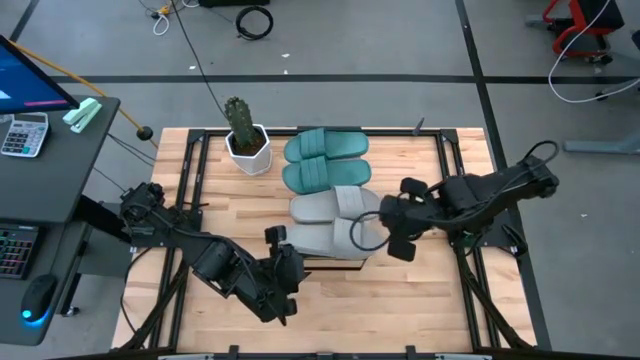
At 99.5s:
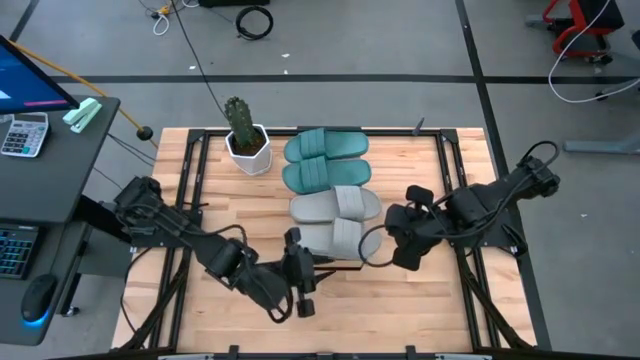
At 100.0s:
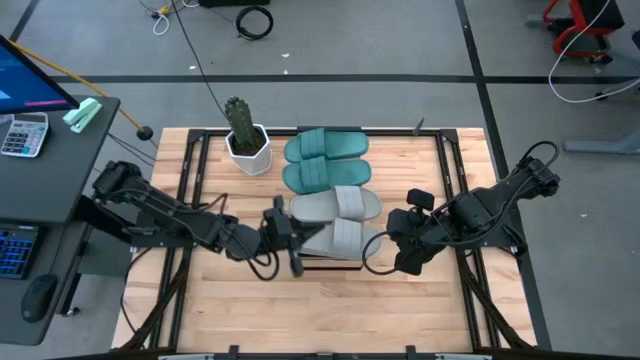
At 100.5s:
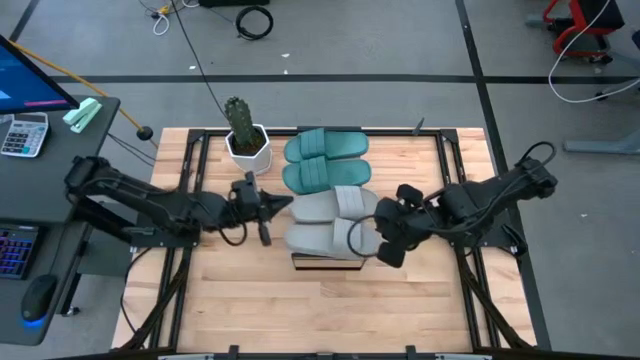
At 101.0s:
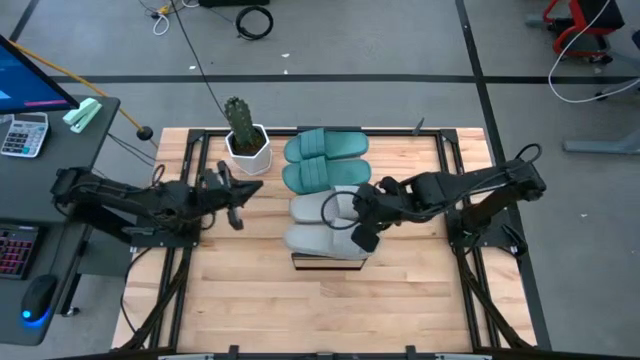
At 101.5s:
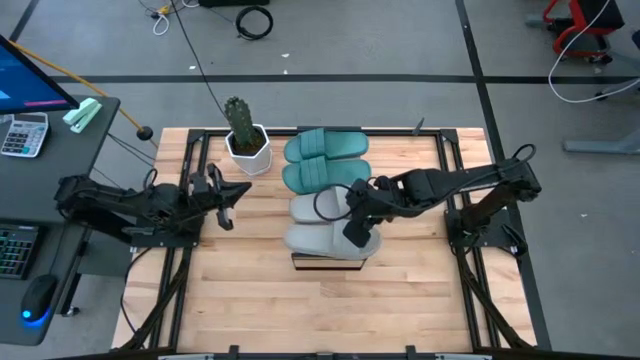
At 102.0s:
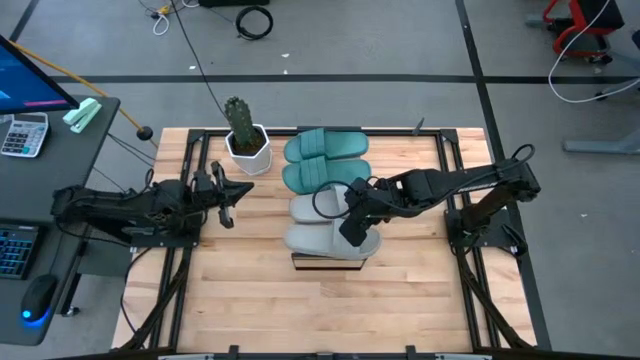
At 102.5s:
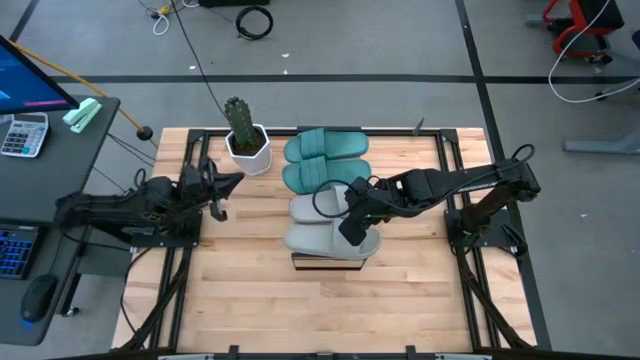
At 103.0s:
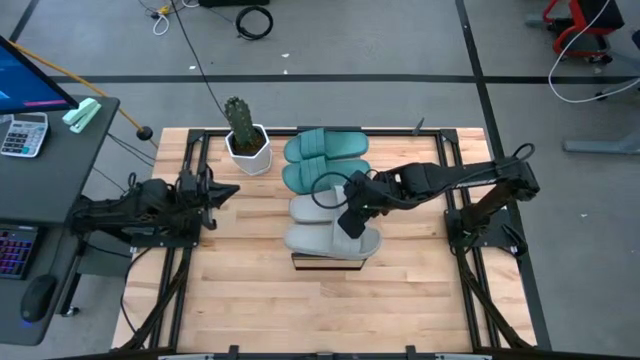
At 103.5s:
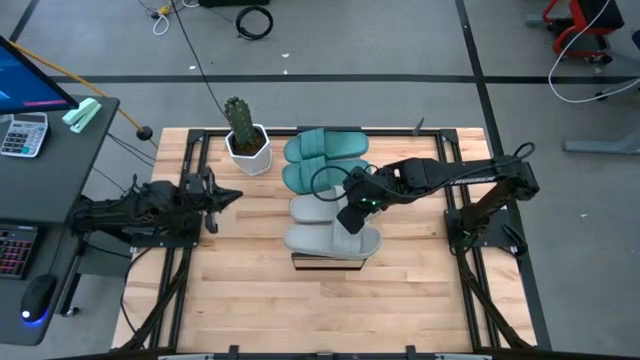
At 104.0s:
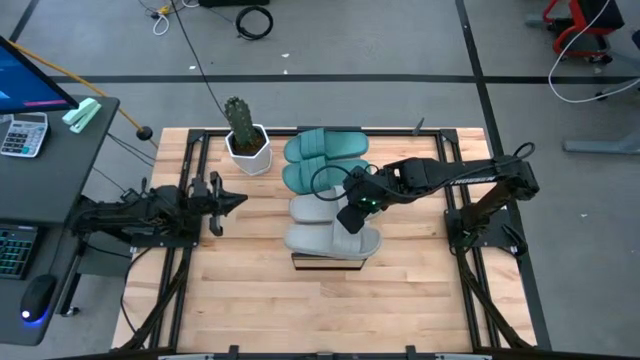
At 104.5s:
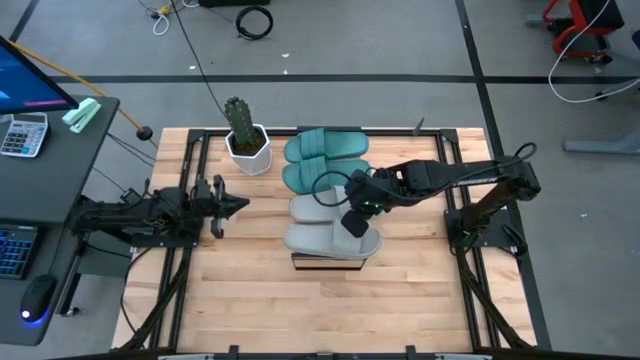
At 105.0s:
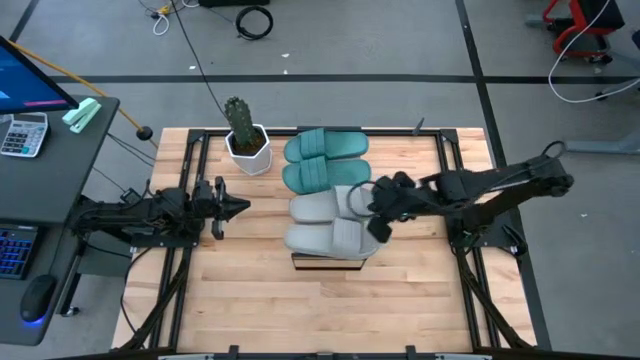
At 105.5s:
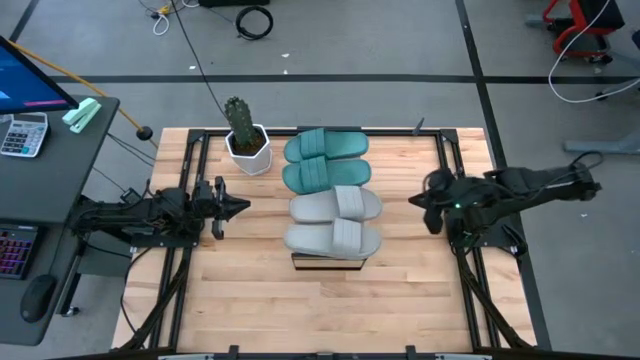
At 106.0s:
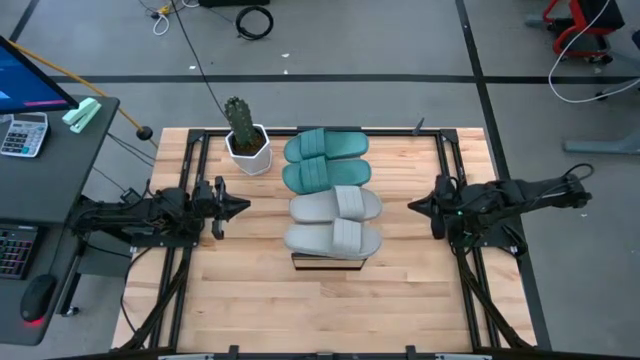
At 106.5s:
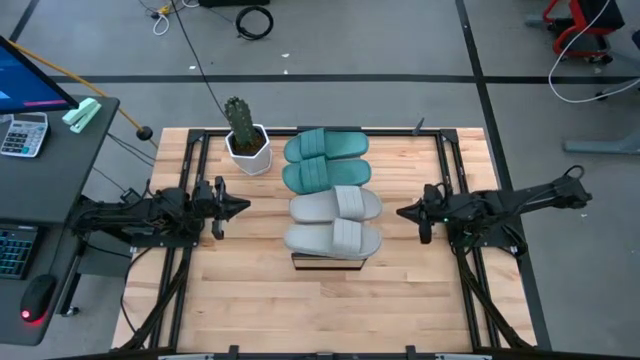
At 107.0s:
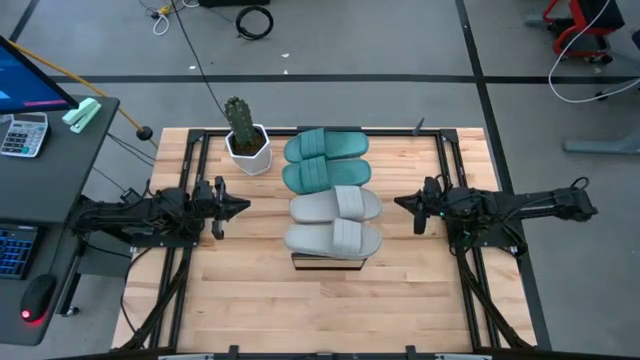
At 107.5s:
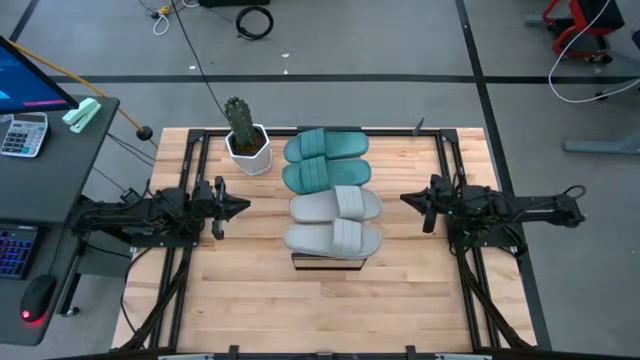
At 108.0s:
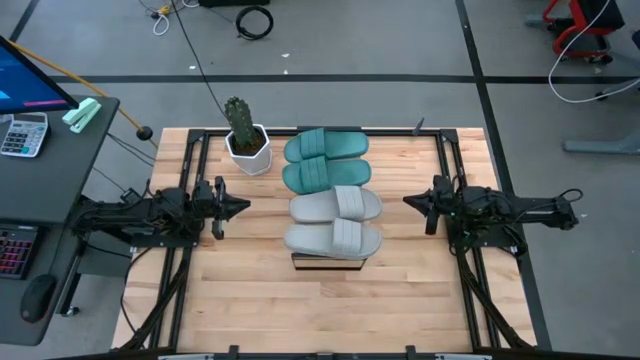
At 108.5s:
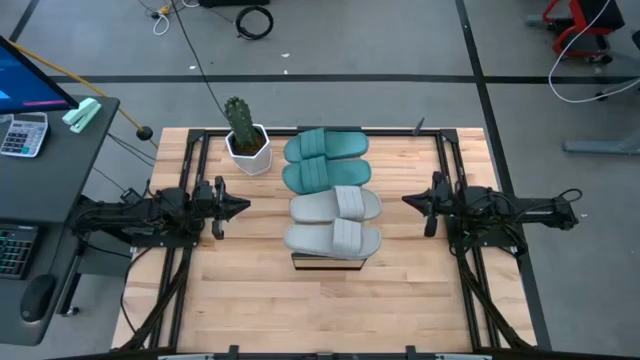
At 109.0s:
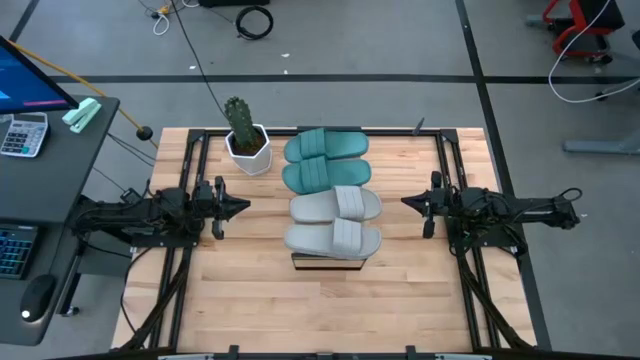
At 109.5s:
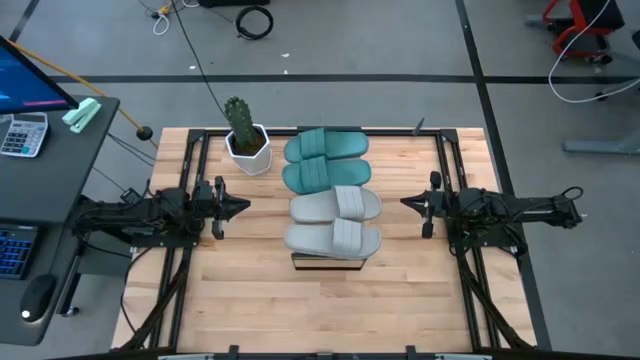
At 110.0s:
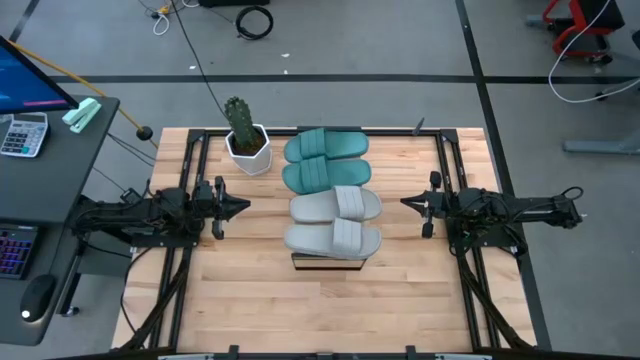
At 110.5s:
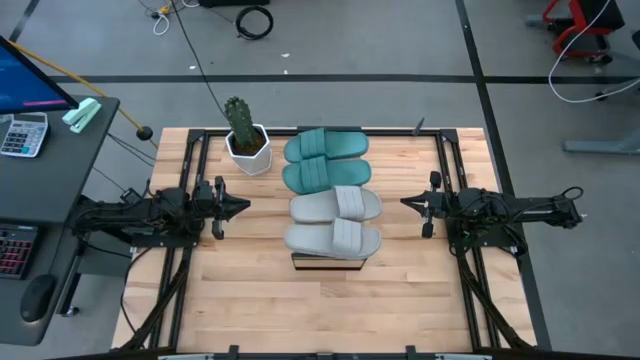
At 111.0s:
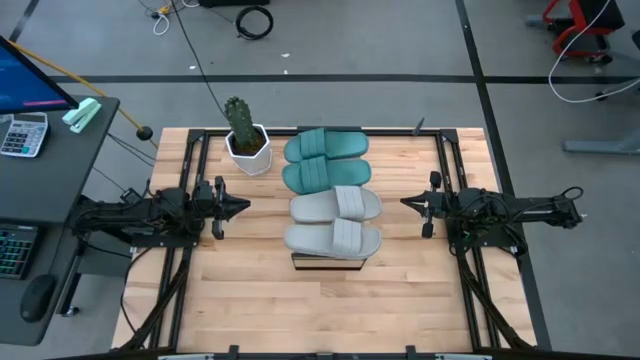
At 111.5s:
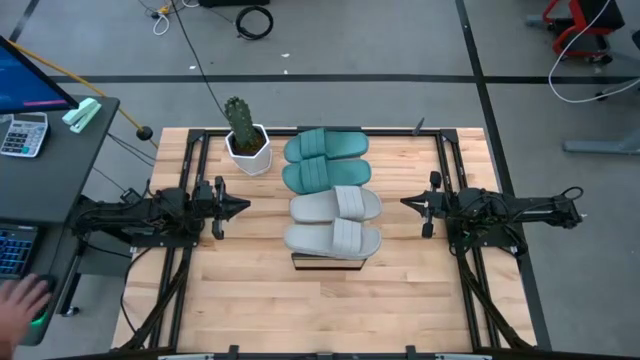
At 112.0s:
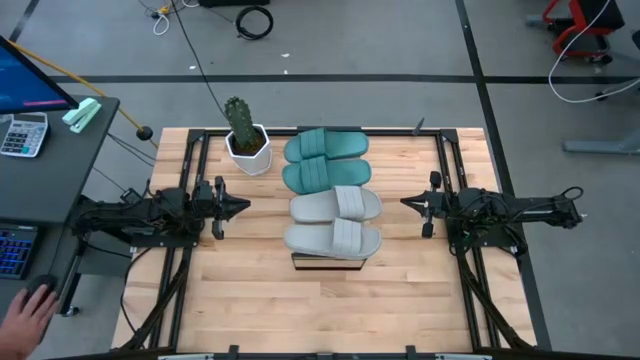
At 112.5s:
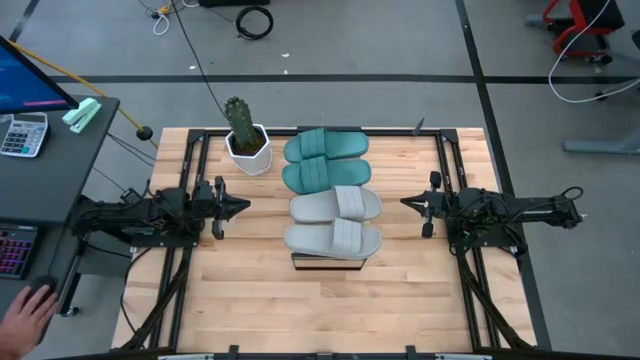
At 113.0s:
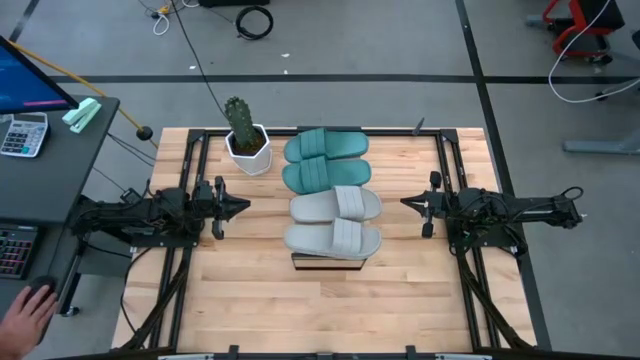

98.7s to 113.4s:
Task: Pick and place slides into the shelf
Return to Home Position

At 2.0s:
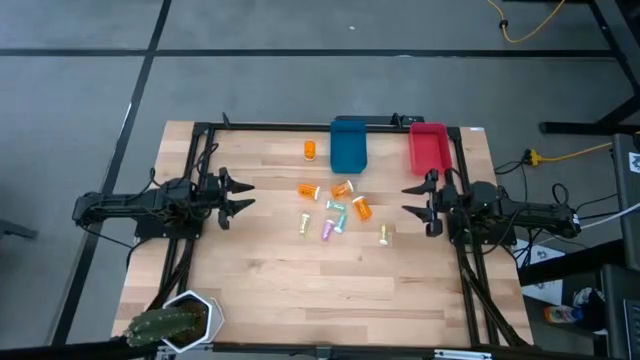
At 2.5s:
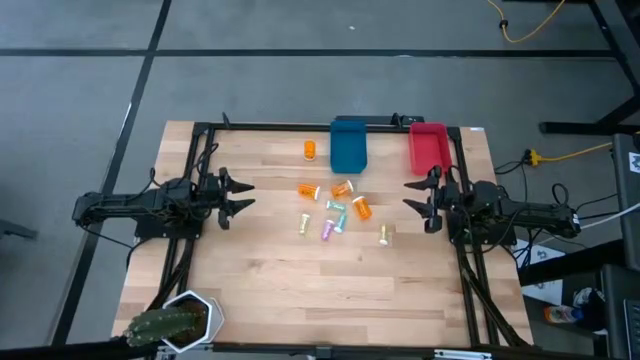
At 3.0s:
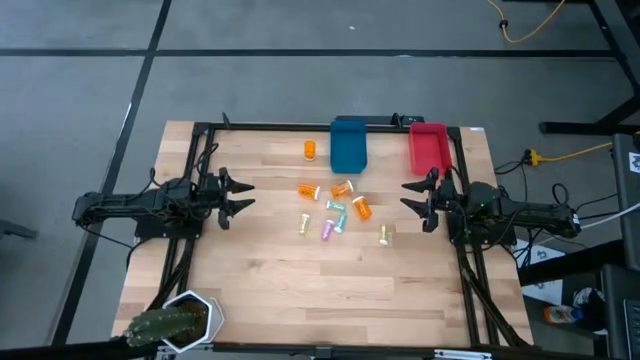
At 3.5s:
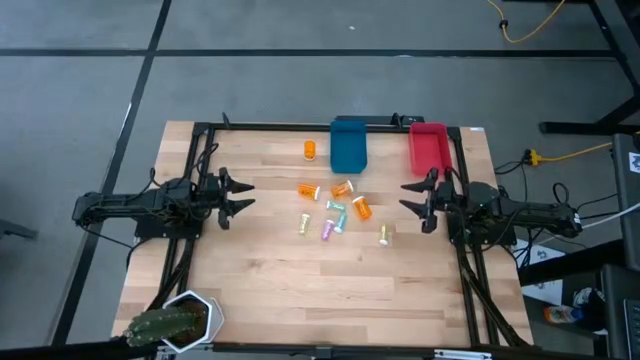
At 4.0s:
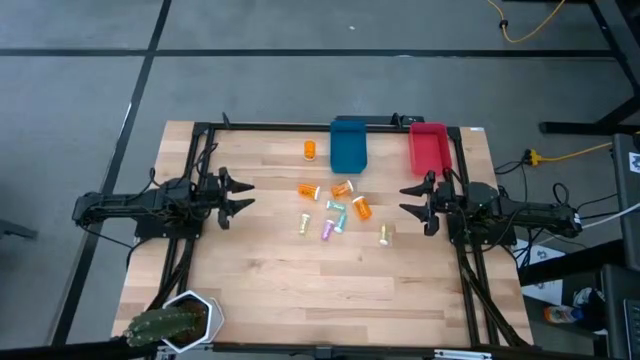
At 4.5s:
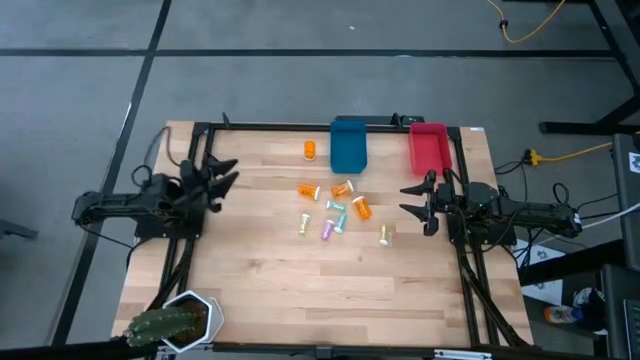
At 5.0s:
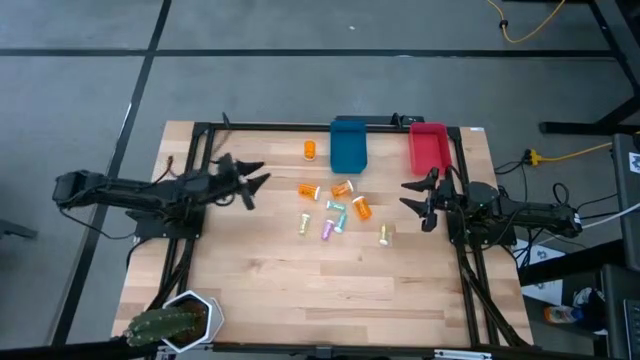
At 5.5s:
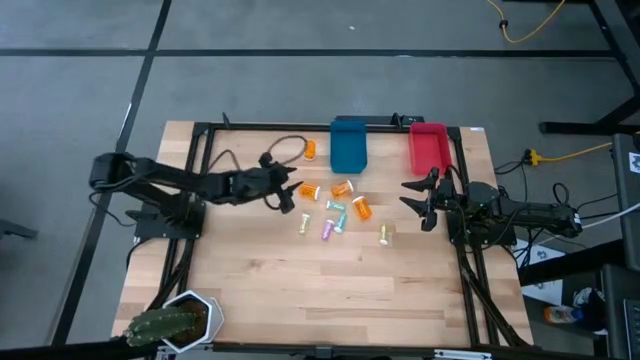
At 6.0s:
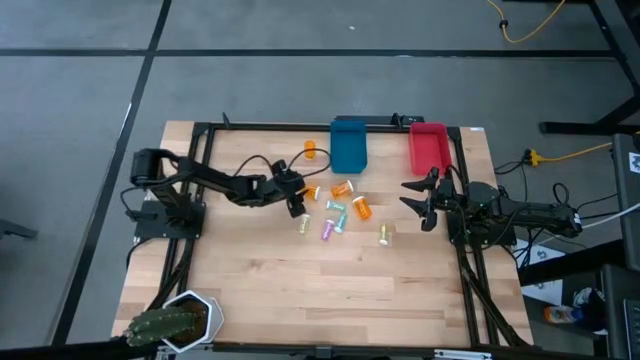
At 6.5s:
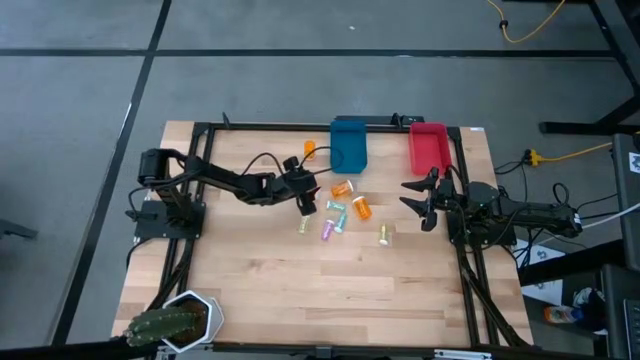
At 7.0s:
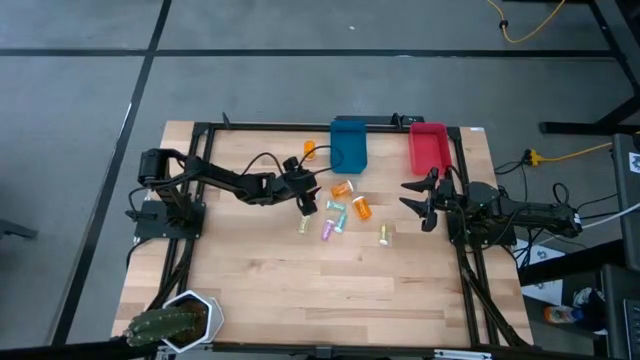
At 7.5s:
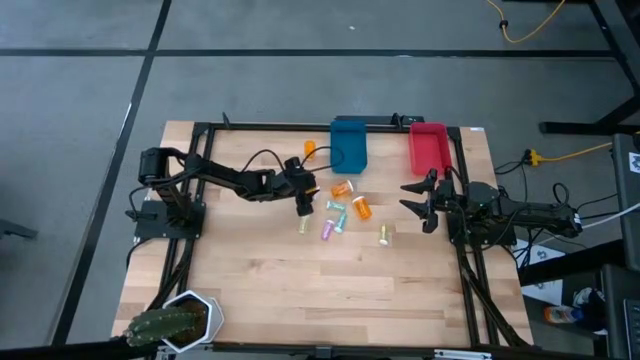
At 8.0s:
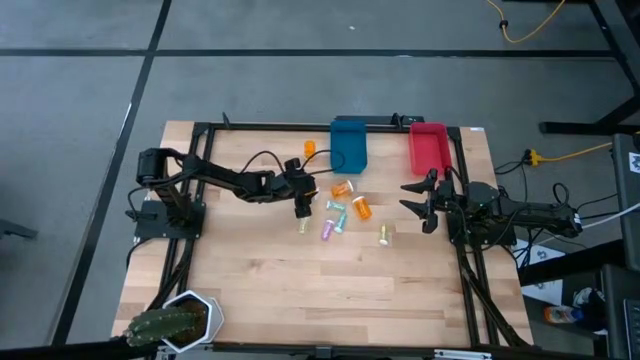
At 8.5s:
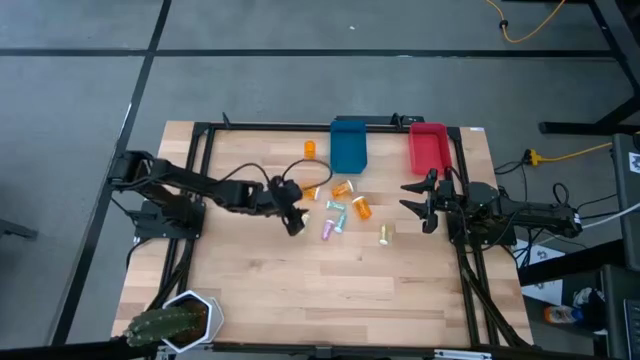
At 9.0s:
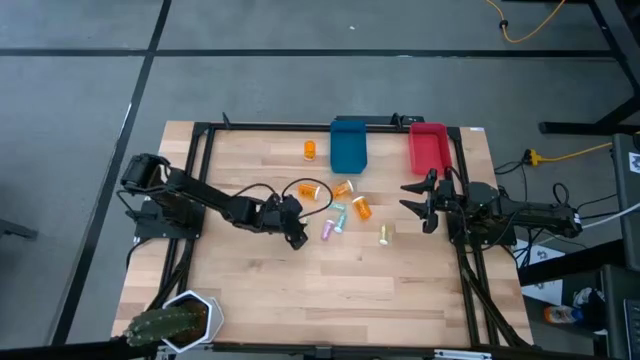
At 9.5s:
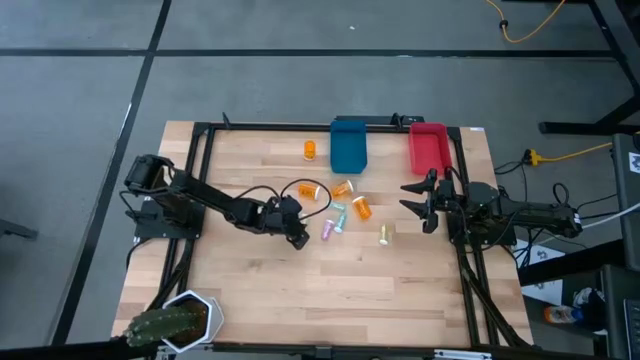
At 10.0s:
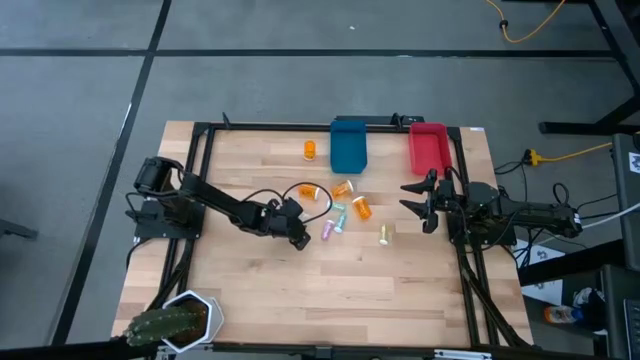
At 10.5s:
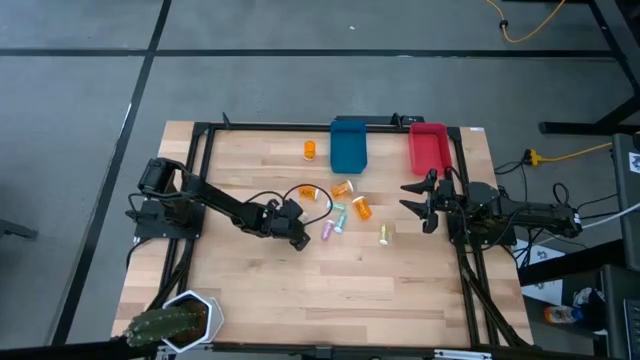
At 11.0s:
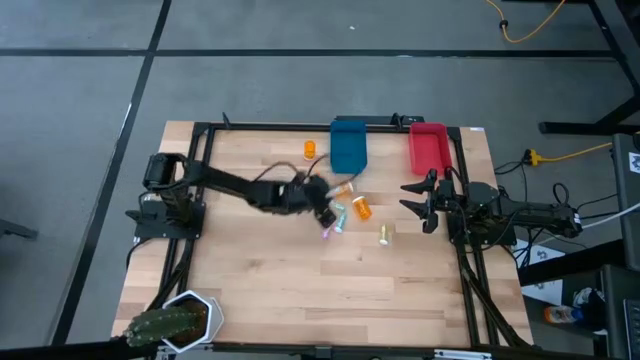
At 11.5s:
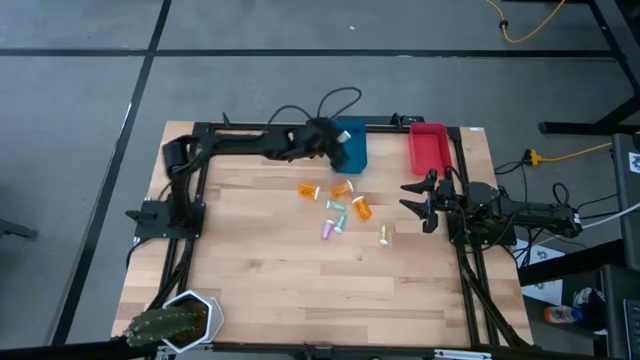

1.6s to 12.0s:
Task: Pick and place medicine bottles into bin by pill shape (circle, oval)
Put the small yellow pill bottle into the blue bin
